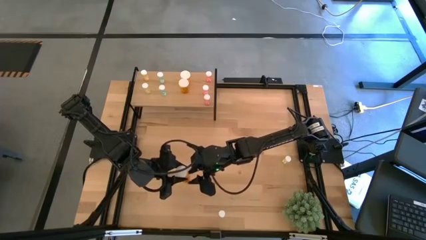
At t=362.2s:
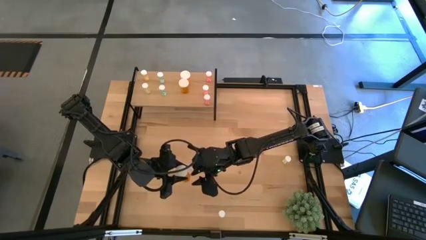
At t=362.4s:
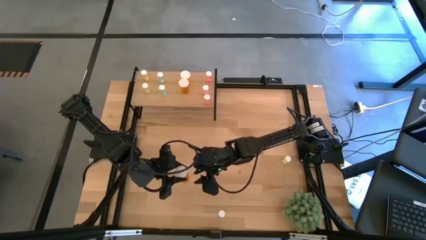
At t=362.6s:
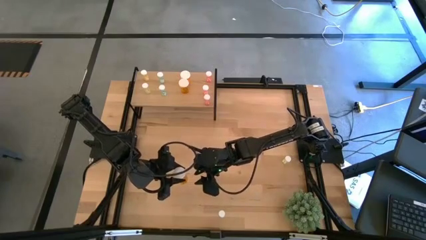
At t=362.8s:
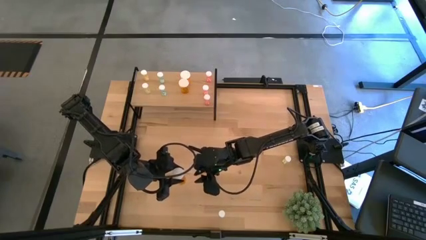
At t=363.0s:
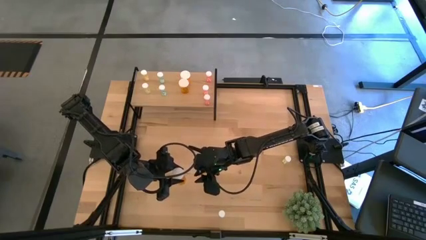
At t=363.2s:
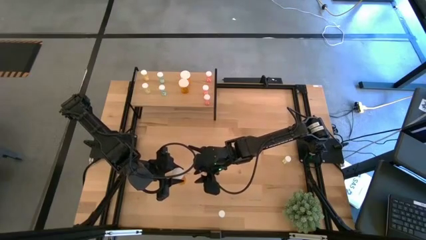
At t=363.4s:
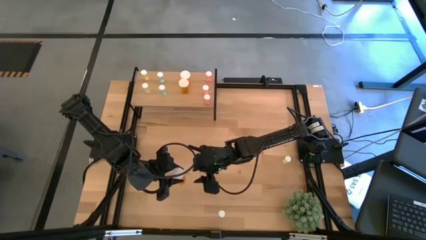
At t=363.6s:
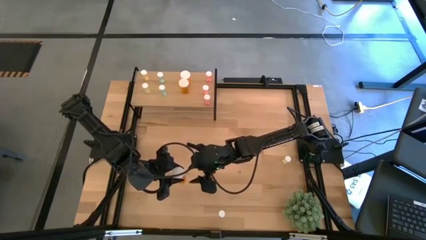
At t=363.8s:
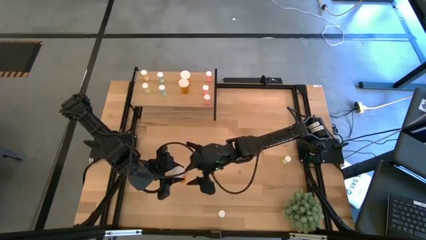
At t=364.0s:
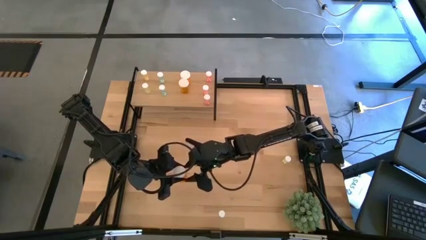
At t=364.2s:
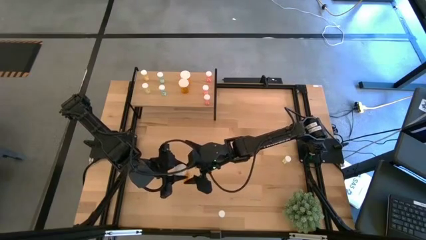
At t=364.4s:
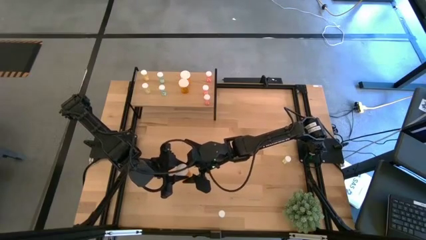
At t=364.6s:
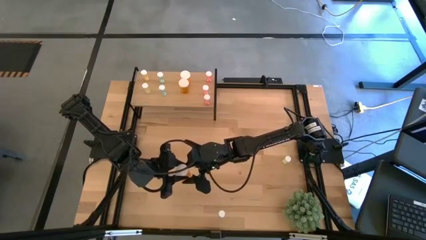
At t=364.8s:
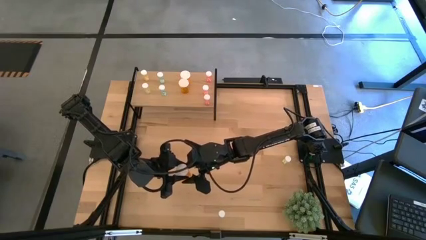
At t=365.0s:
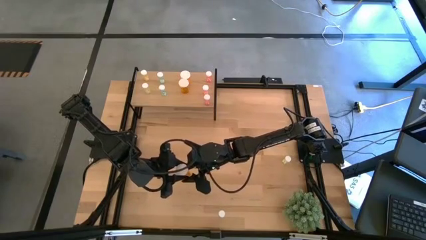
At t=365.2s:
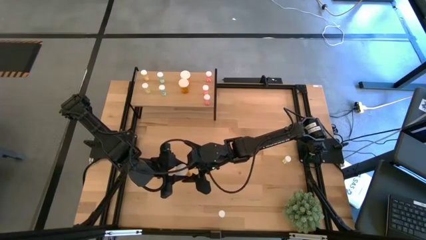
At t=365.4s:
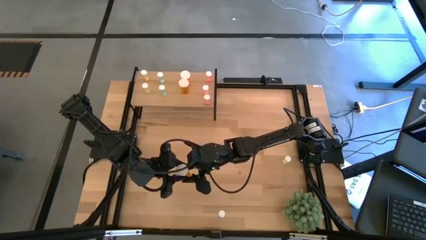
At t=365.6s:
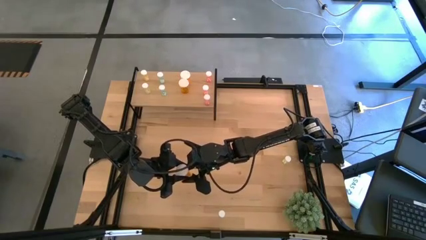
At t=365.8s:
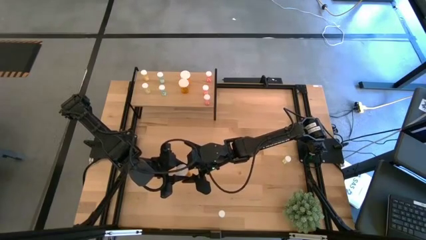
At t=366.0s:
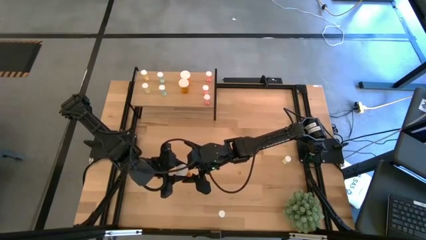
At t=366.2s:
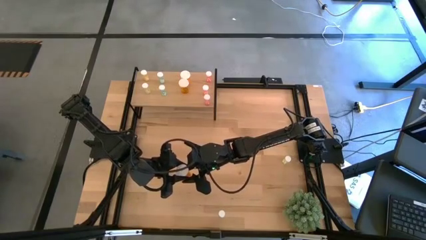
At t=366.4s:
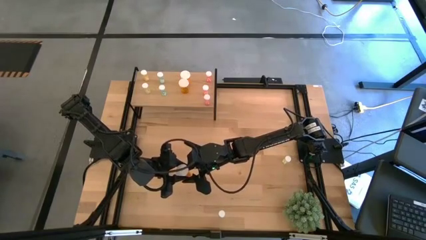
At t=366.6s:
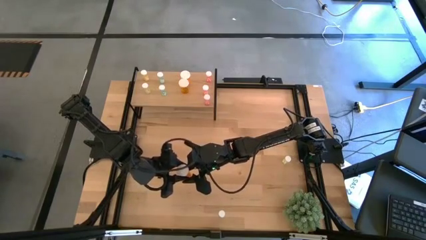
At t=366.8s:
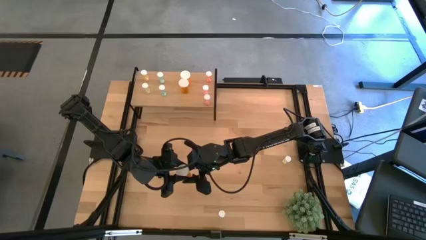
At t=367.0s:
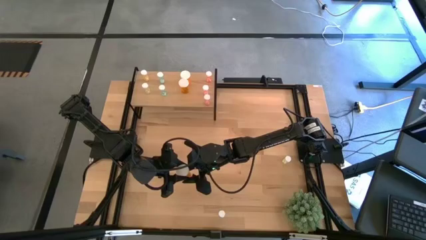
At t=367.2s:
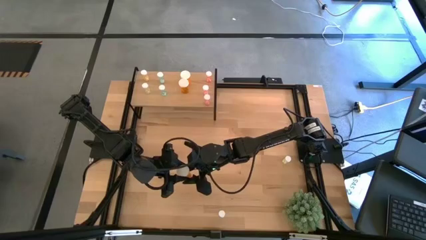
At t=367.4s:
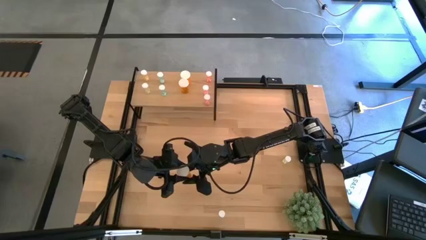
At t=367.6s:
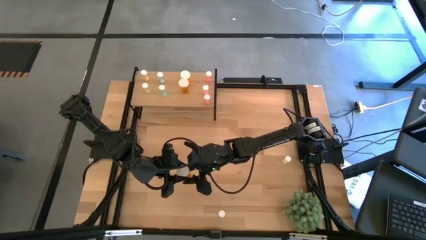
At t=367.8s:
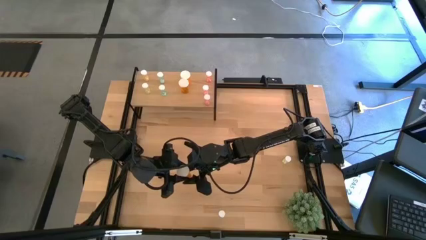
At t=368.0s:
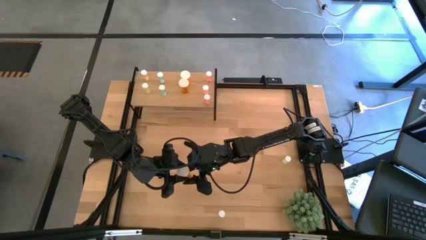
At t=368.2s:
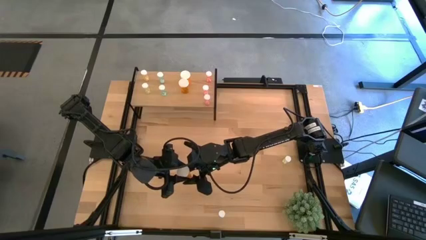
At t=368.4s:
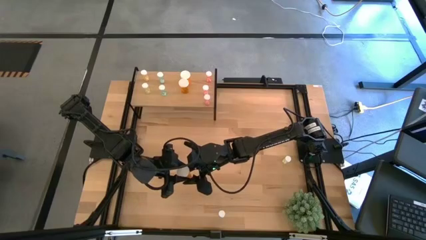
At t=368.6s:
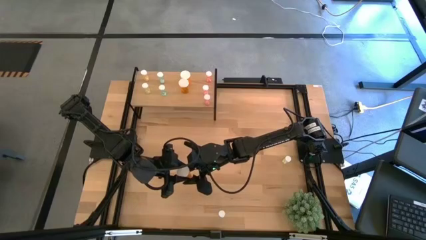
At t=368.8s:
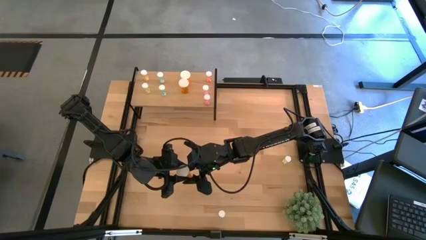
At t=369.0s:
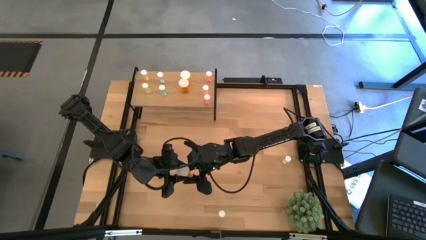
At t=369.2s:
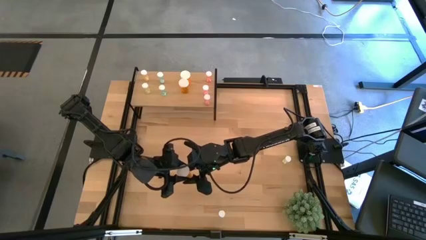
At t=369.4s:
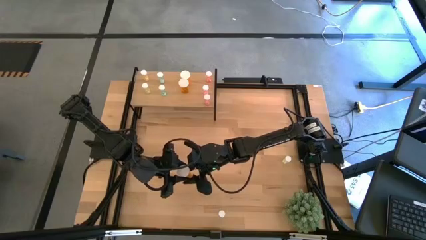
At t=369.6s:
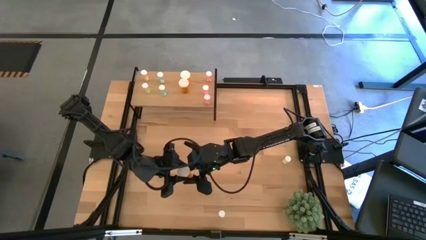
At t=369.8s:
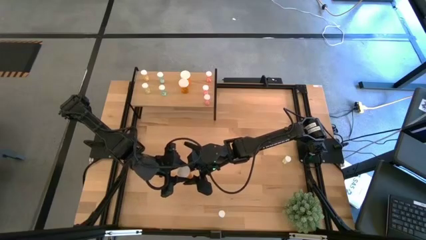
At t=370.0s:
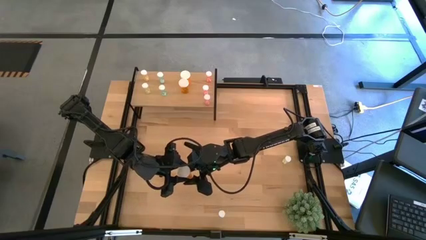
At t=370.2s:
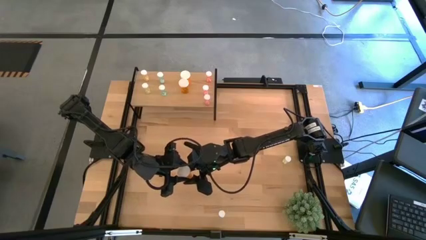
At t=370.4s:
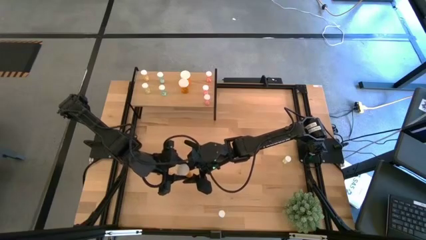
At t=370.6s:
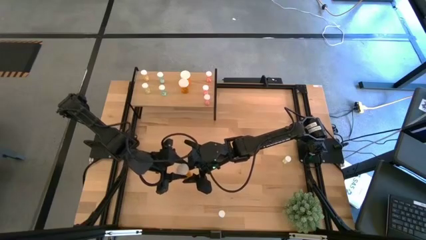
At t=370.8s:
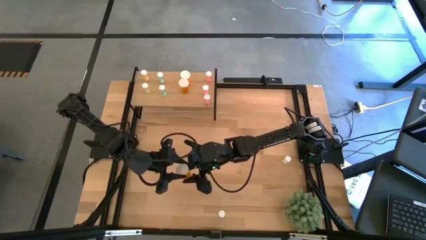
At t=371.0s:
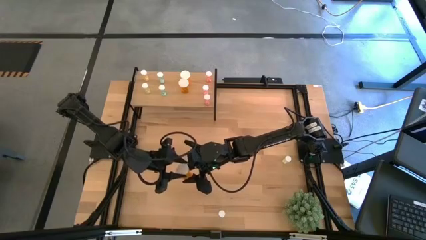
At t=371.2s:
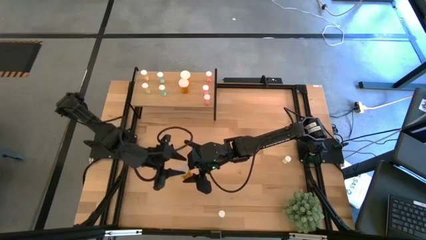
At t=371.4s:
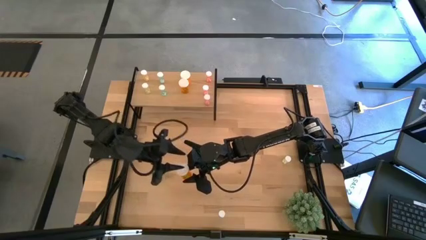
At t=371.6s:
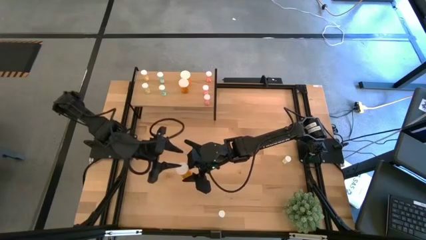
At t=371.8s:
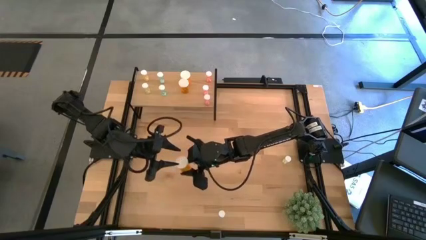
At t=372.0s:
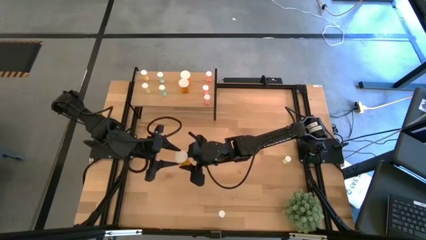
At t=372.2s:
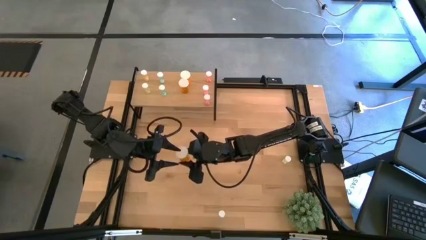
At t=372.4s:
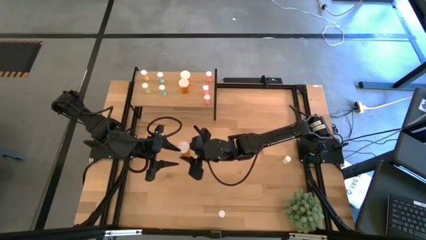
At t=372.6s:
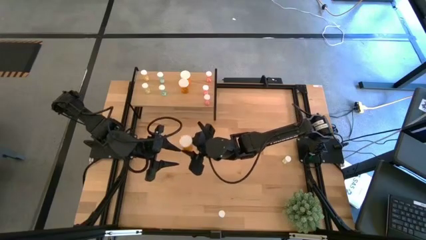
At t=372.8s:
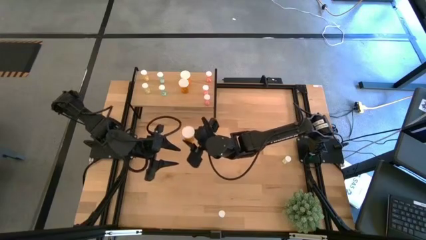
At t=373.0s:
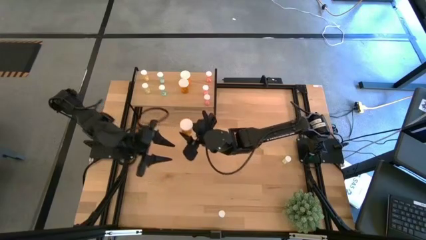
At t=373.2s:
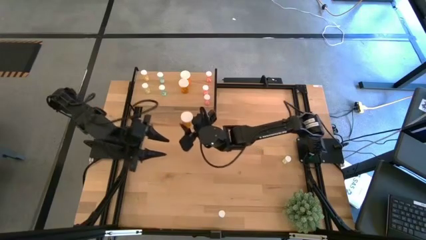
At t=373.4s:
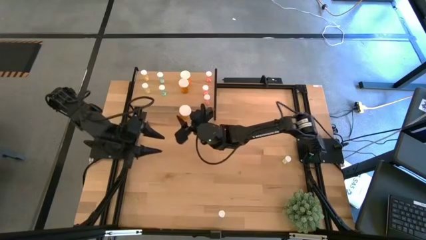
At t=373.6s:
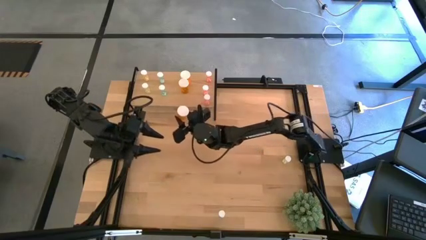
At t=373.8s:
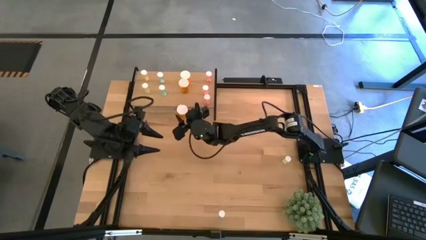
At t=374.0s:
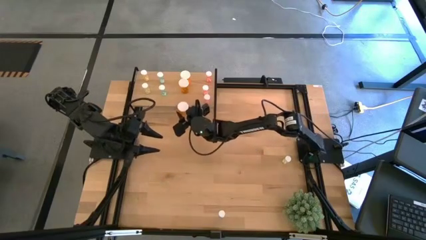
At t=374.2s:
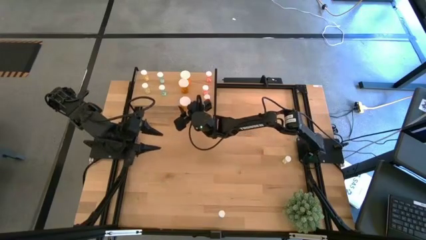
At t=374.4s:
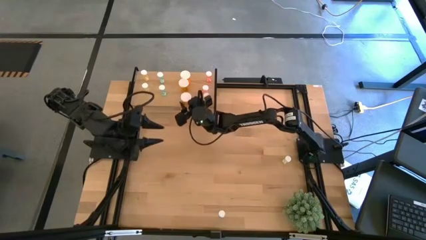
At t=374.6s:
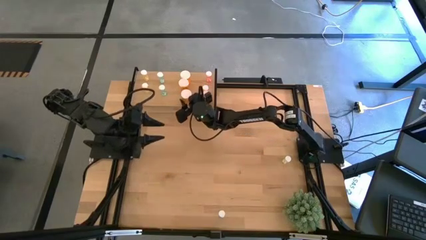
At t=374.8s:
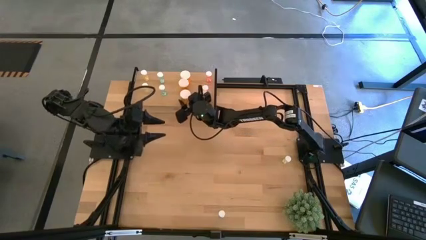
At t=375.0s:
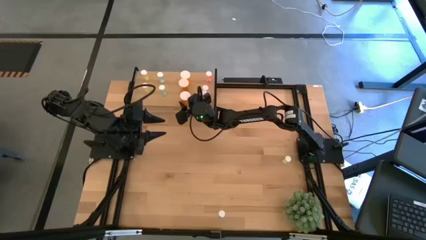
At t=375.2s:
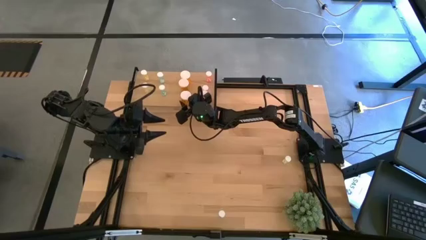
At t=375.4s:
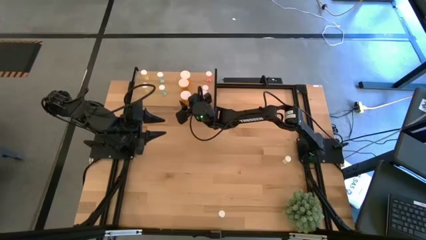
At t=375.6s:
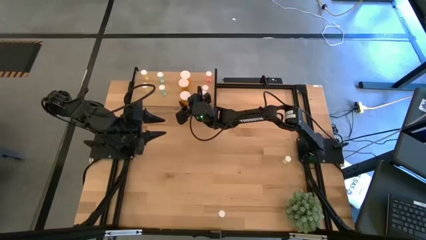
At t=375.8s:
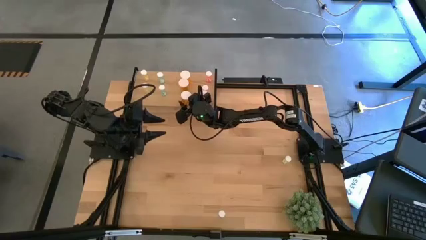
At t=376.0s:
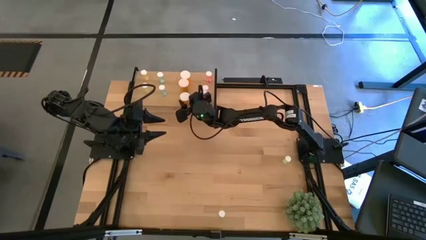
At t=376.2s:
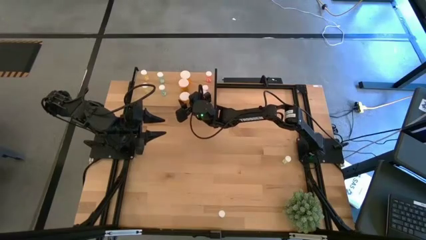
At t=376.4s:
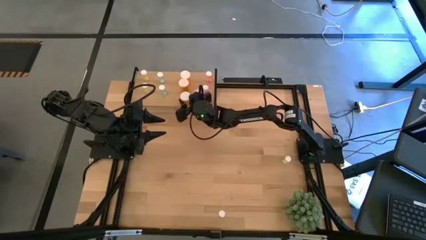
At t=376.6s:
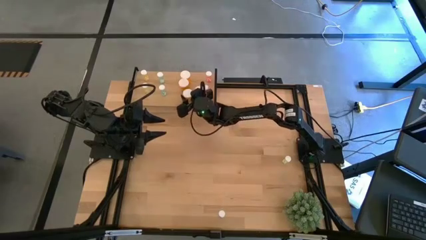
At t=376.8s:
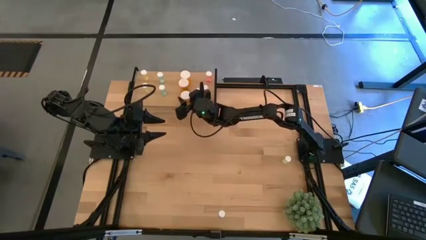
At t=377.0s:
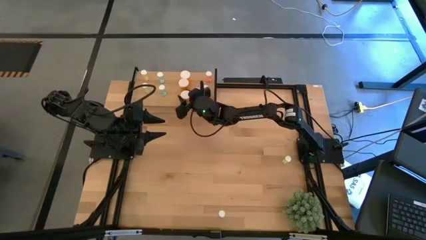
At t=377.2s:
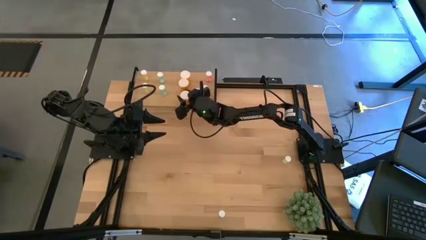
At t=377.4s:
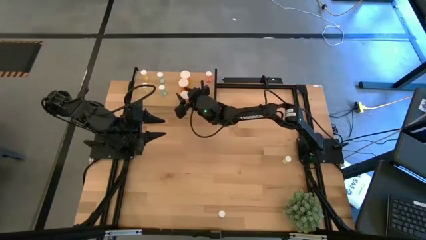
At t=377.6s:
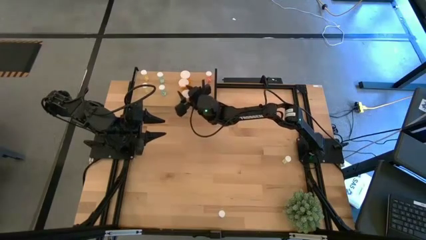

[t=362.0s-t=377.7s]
Task: Pick and place medicine bottles onto shelf by color
Put the orange pill bottle on the shelf aligned with the orange pill bottle on the shelf
